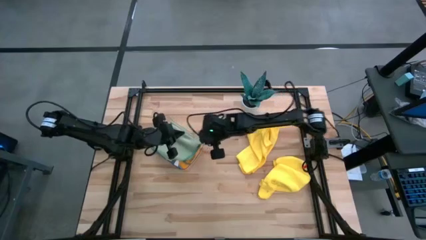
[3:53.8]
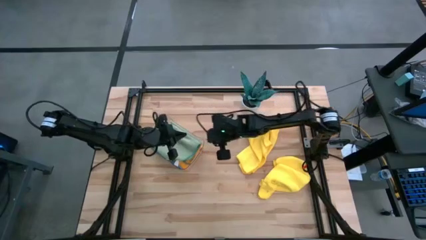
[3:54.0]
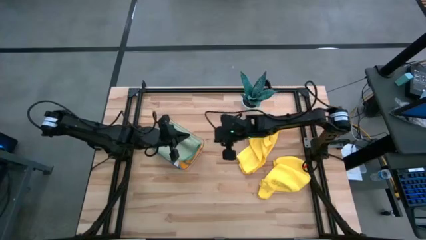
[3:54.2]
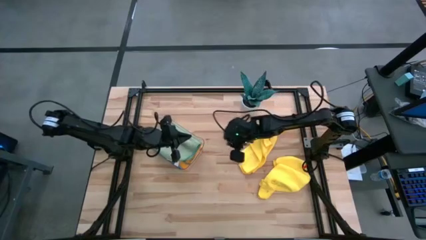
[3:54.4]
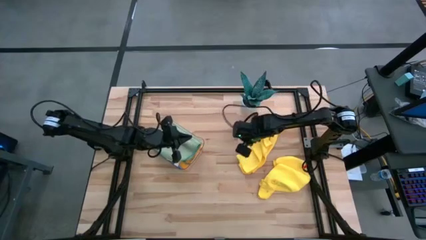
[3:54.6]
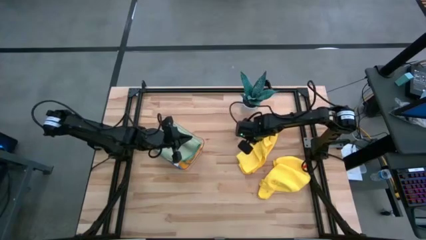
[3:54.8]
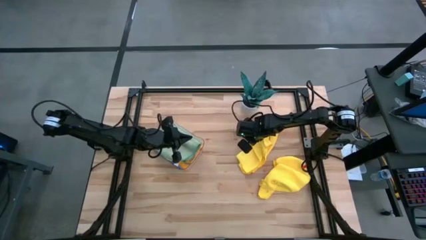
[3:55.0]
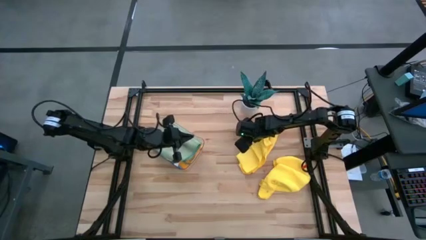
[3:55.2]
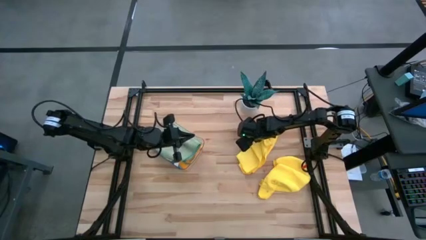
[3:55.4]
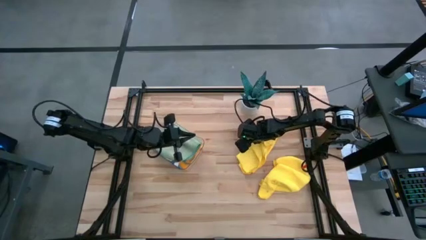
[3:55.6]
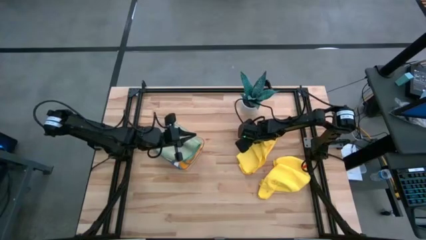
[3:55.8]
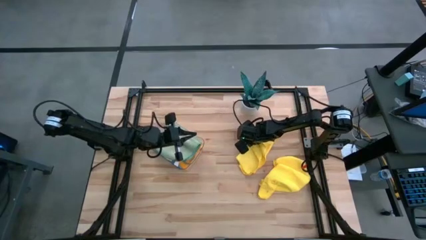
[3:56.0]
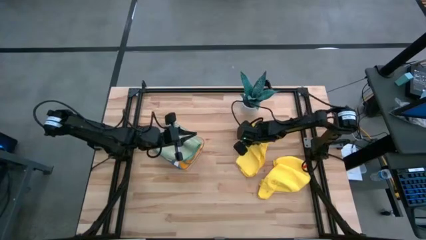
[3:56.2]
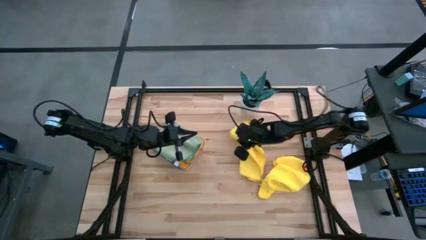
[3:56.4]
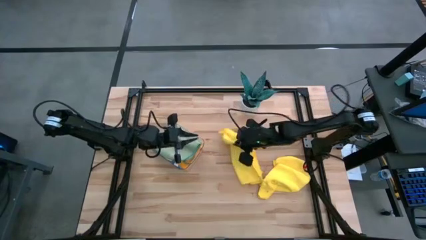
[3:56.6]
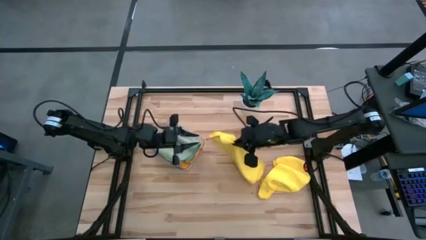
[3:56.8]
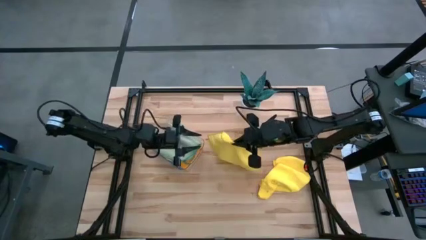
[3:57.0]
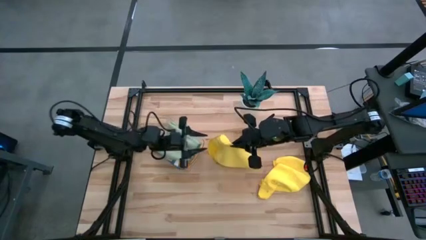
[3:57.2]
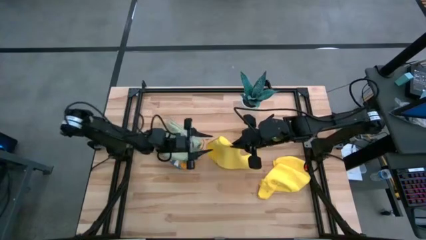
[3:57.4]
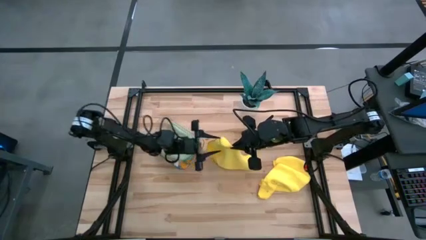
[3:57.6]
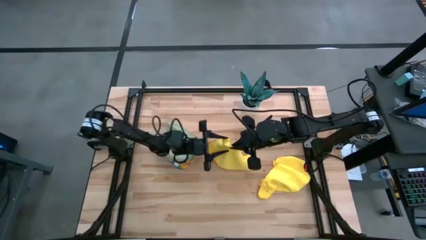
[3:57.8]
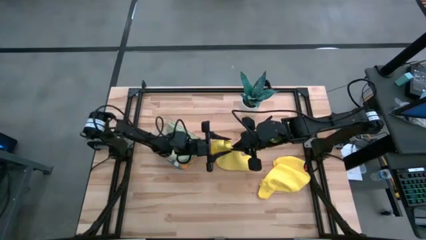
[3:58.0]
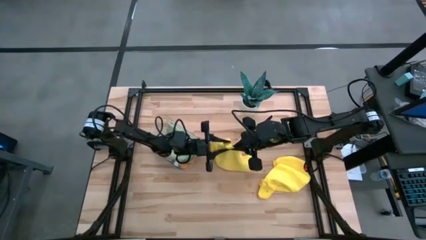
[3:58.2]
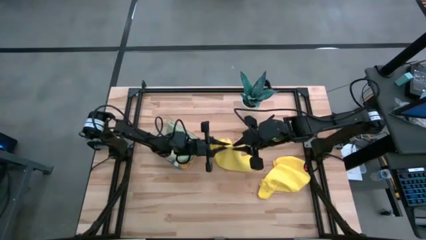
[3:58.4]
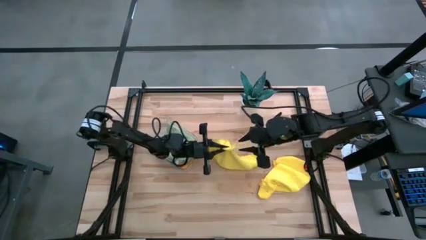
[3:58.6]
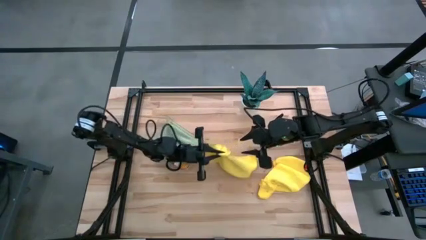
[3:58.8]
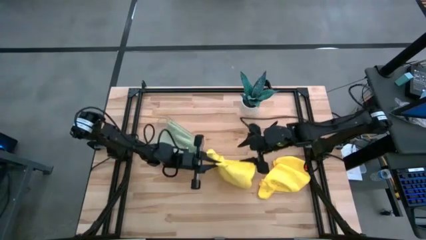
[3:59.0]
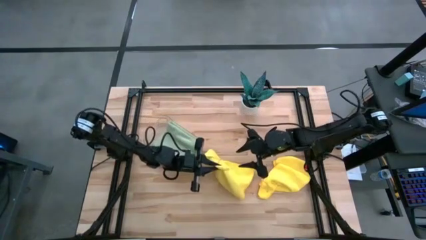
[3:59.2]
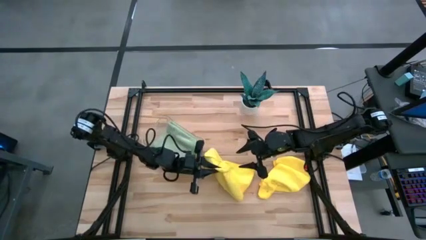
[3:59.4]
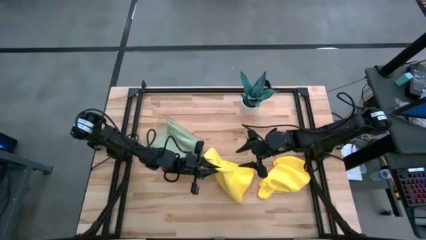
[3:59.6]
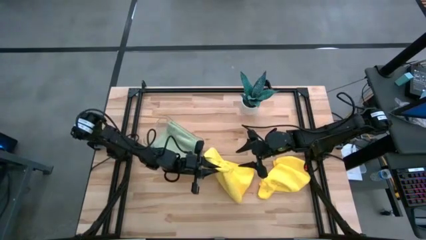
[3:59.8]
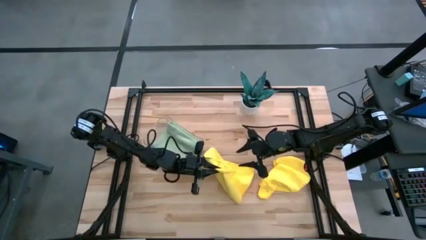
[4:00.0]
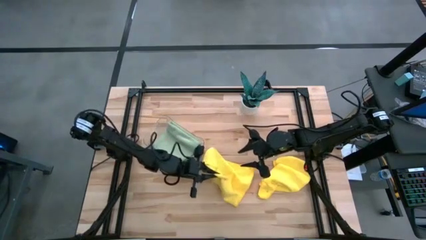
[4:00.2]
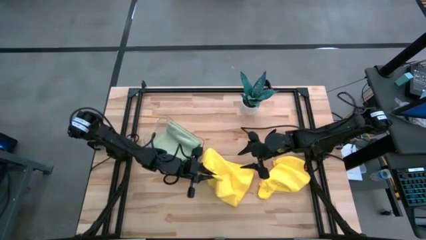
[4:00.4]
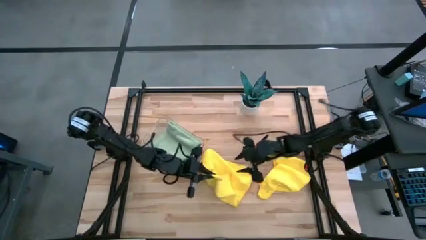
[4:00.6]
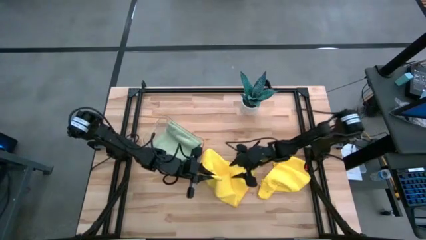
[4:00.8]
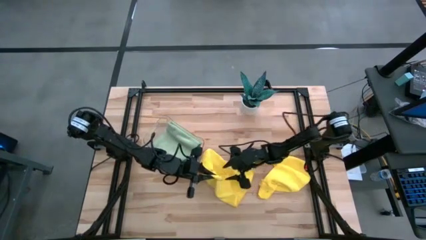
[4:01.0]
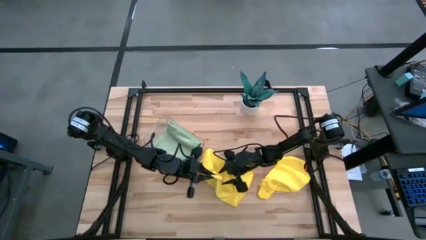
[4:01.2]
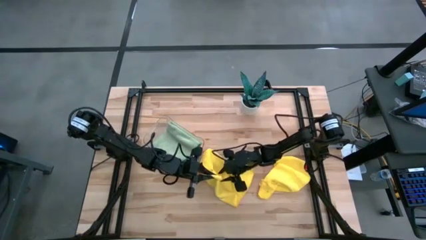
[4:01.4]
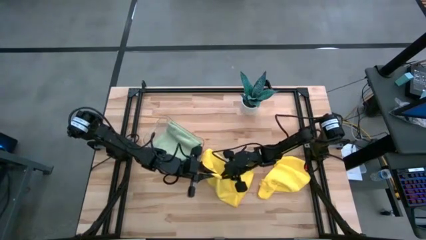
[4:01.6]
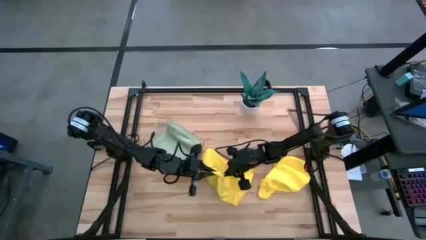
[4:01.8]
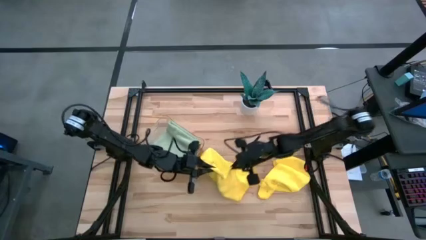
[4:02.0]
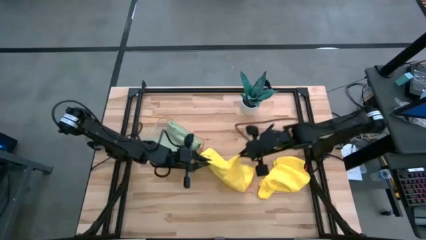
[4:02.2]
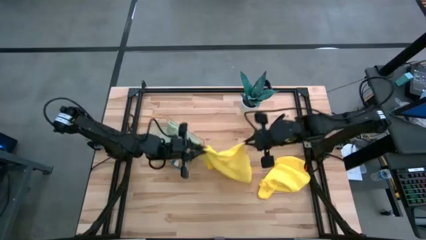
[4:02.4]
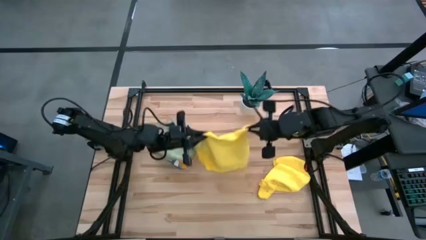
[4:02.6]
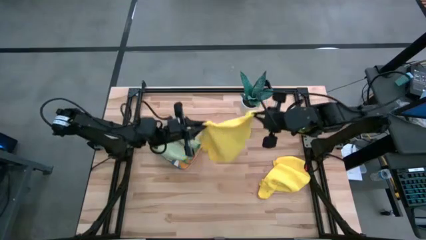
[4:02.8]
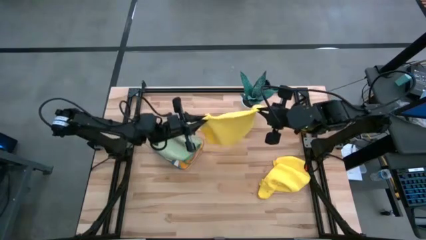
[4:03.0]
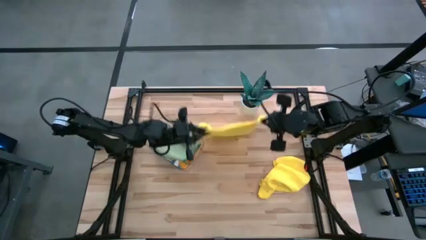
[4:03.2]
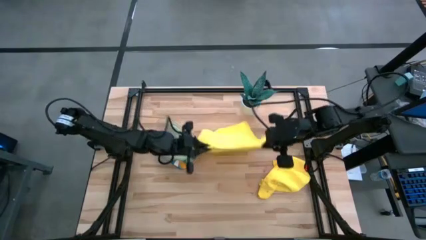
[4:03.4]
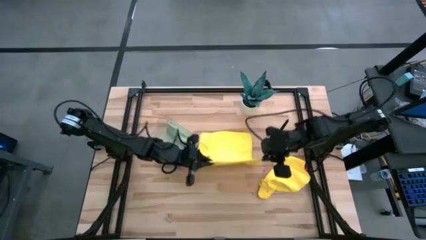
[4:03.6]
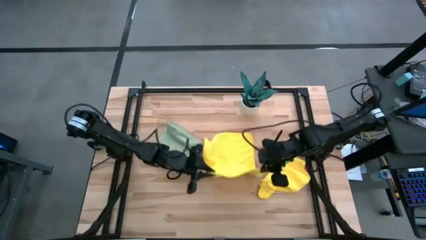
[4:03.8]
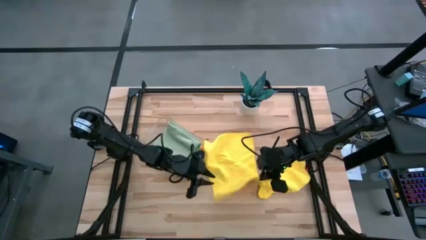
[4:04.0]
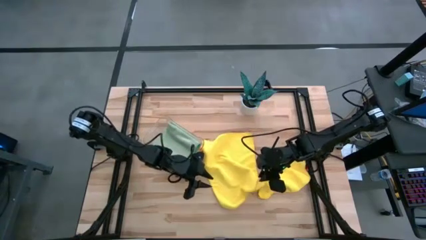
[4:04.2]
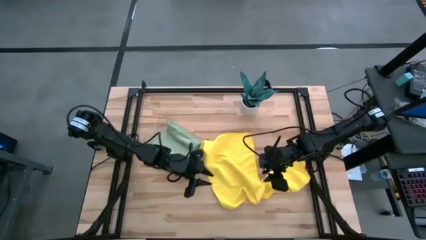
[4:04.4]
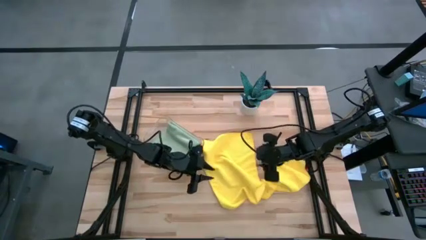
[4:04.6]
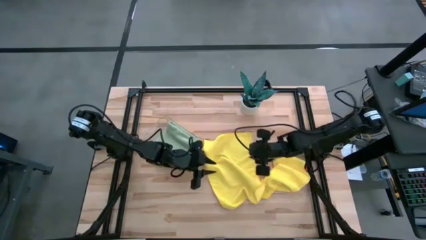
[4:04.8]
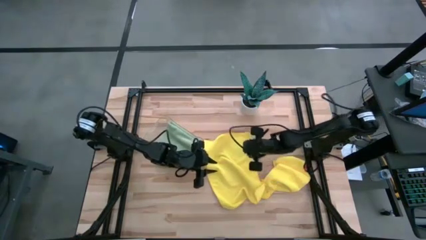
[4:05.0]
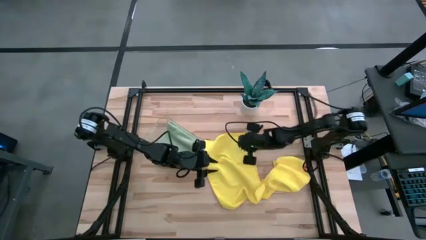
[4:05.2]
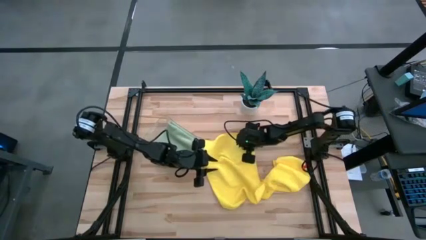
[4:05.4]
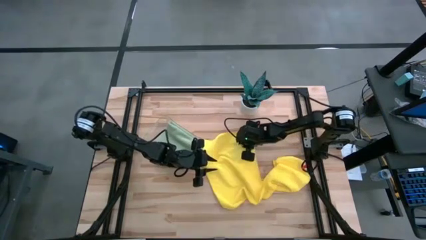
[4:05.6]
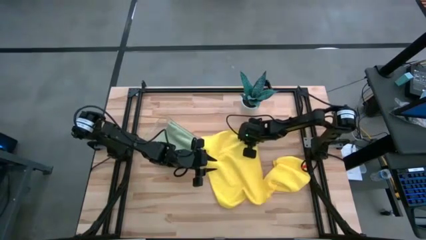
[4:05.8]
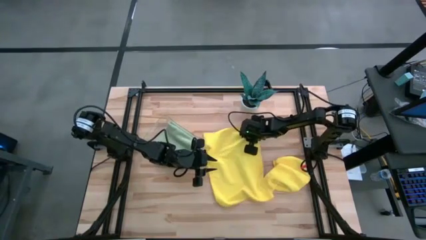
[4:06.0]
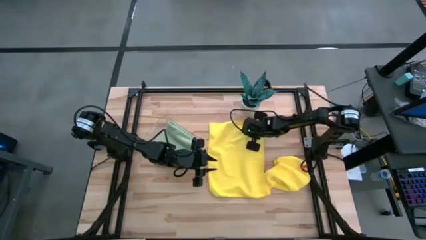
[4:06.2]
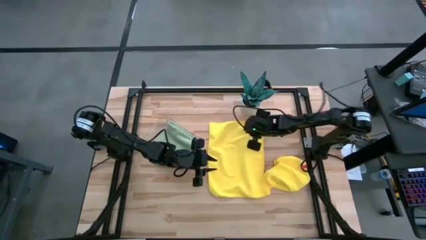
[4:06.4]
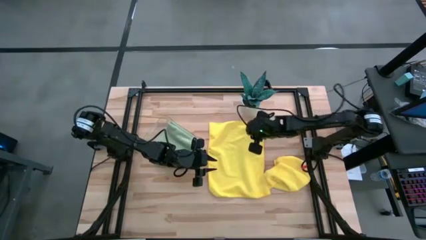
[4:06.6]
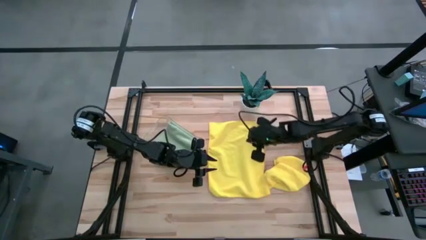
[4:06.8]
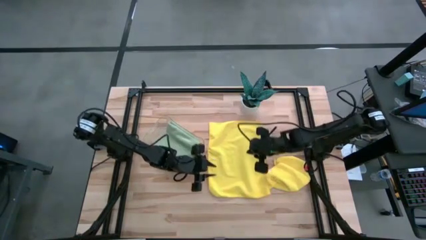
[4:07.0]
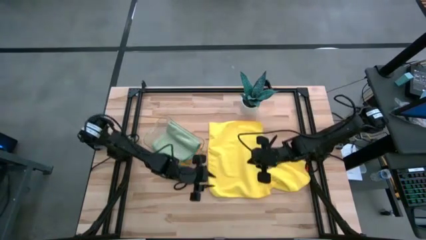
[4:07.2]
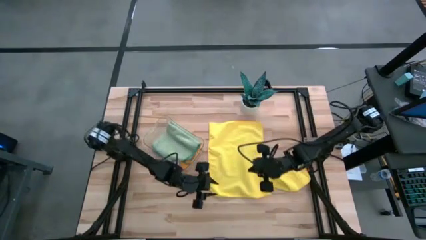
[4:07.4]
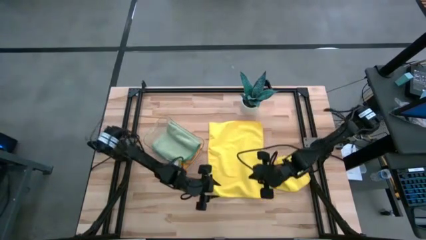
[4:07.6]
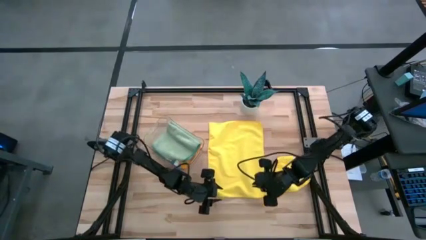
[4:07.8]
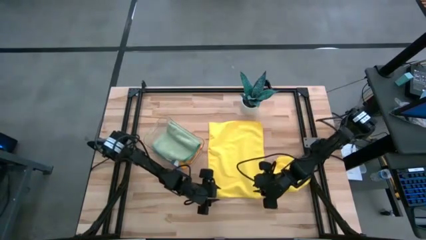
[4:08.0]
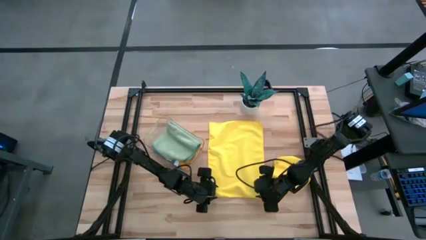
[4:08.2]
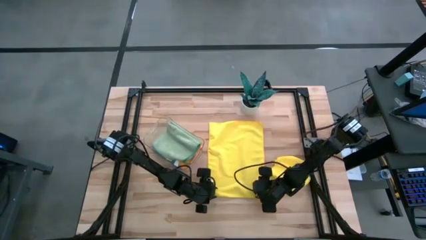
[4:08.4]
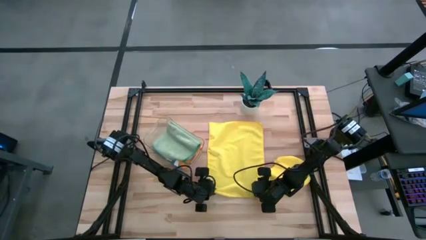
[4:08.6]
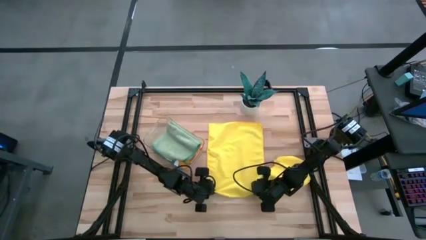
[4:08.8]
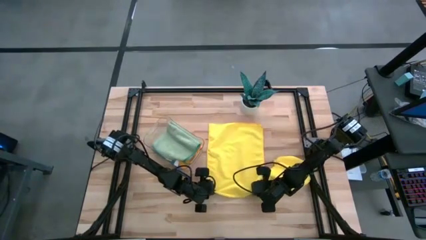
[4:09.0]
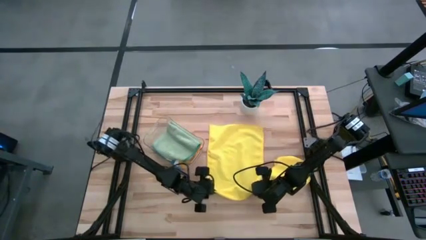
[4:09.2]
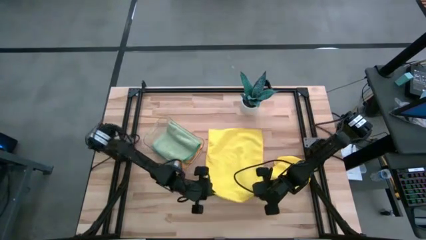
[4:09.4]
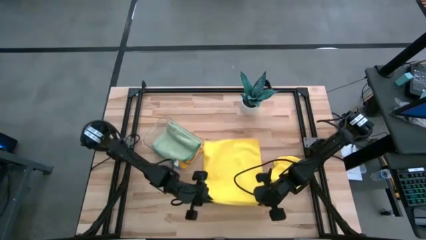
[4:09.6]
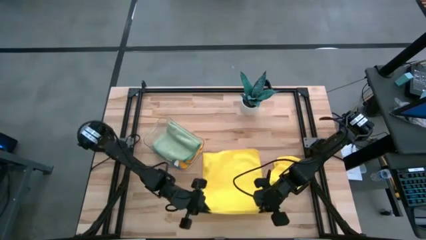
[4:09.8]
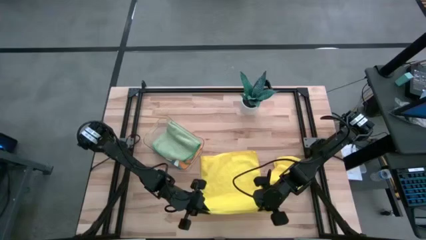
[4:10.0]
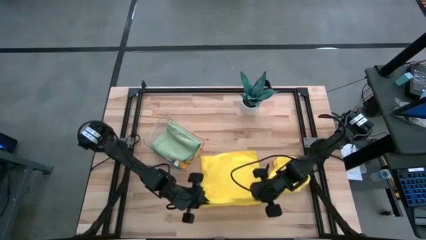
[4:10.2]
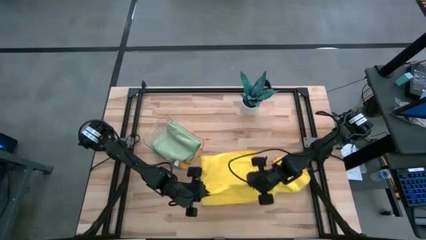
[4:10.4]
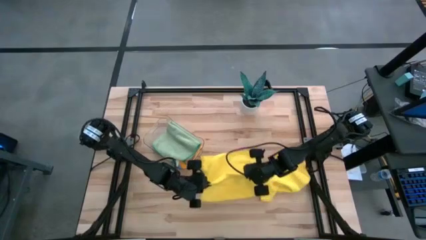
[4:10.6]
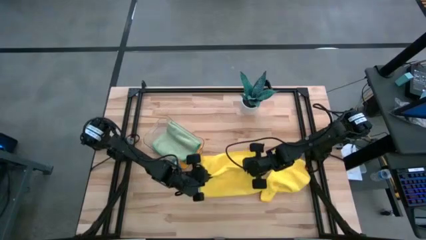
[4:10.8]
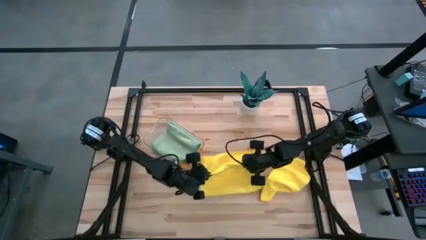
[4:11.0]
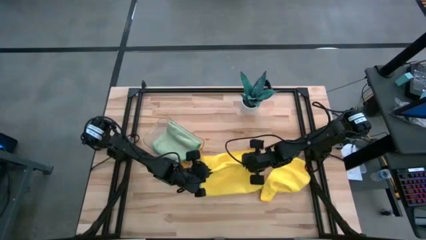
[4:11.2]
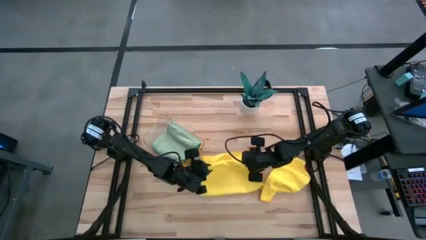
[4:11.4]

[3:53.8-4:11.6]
Task: Fold microfiber towels
Fold the left yellow microfiber cloth
